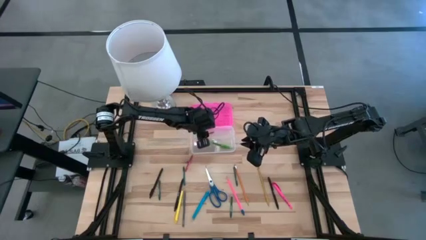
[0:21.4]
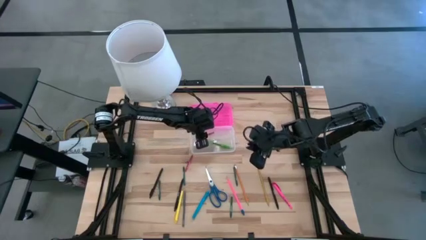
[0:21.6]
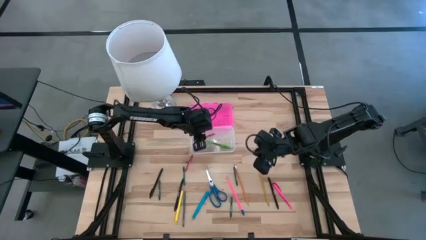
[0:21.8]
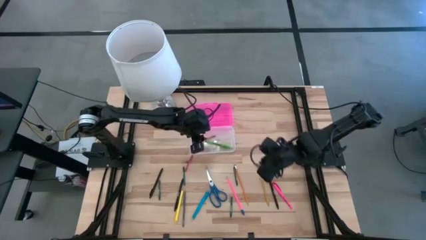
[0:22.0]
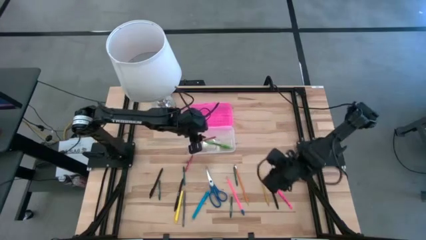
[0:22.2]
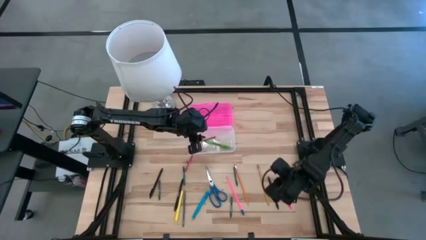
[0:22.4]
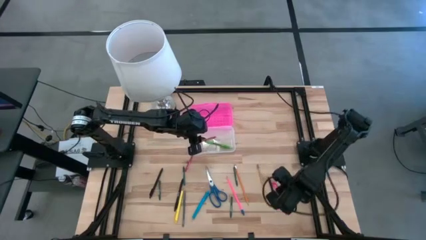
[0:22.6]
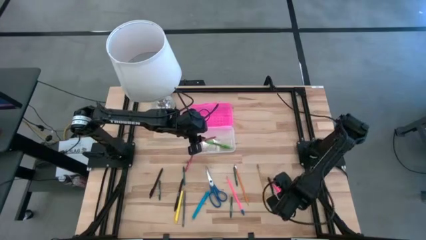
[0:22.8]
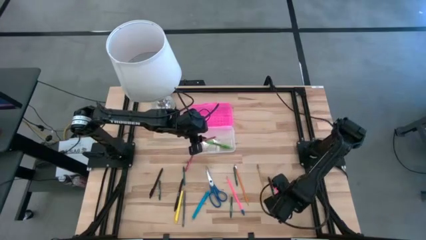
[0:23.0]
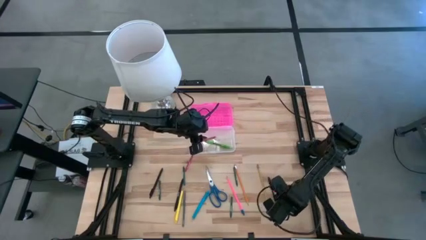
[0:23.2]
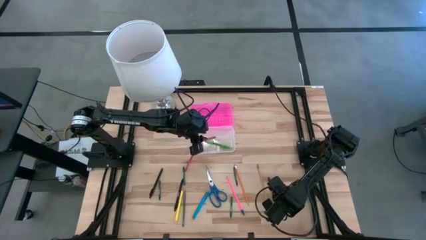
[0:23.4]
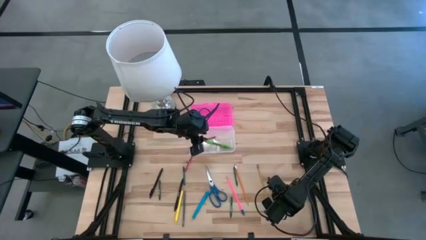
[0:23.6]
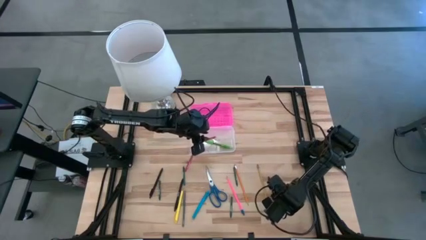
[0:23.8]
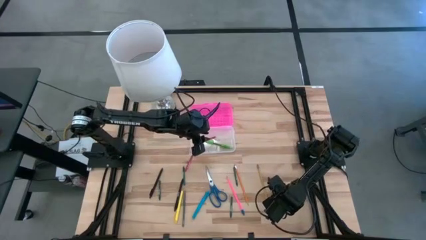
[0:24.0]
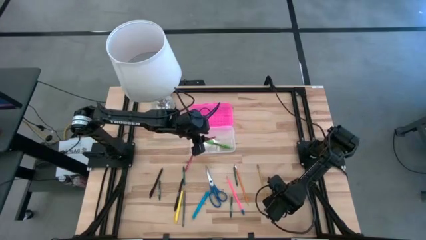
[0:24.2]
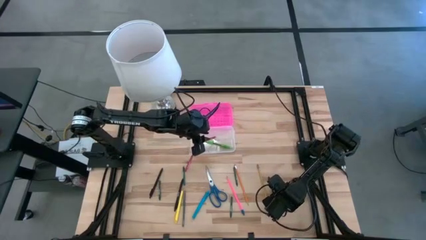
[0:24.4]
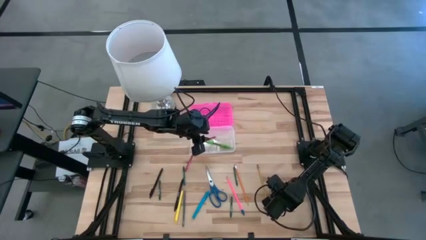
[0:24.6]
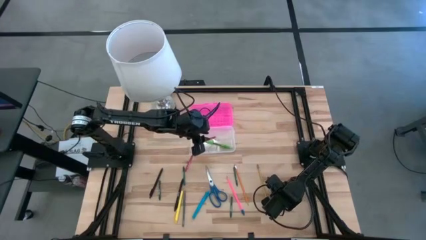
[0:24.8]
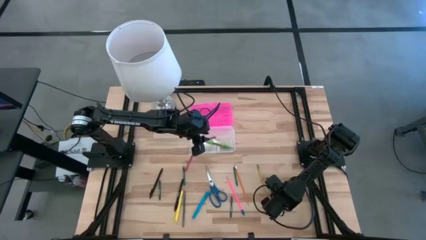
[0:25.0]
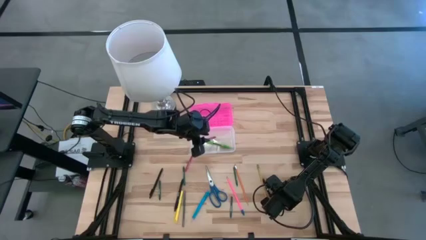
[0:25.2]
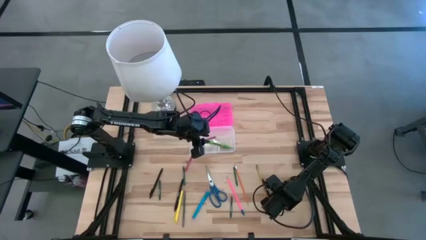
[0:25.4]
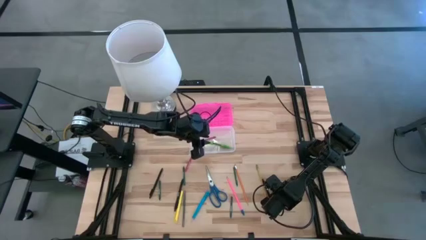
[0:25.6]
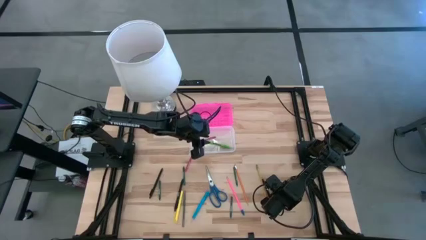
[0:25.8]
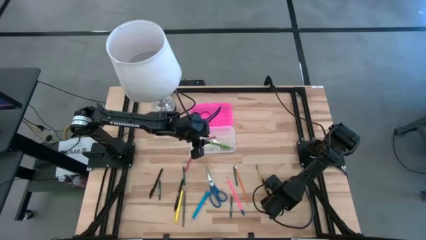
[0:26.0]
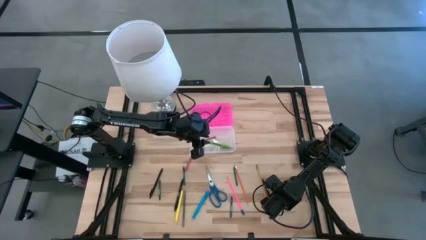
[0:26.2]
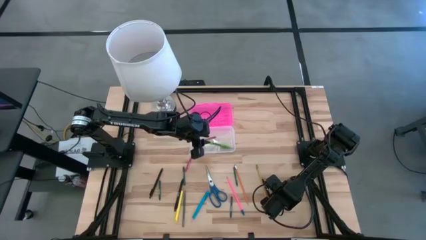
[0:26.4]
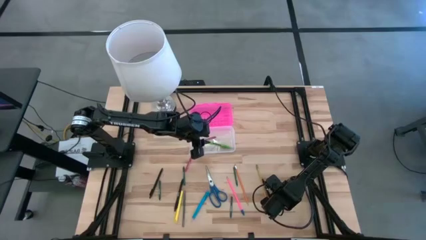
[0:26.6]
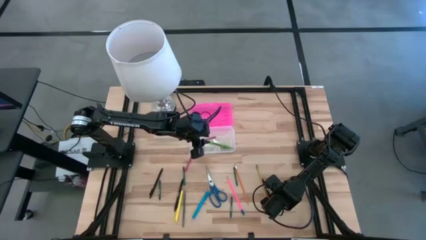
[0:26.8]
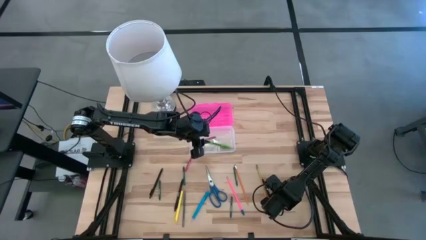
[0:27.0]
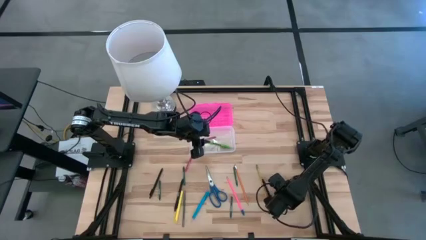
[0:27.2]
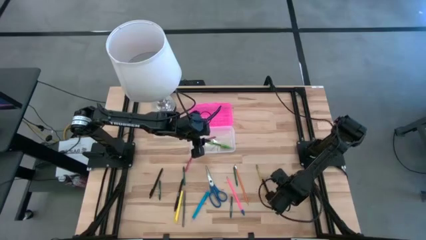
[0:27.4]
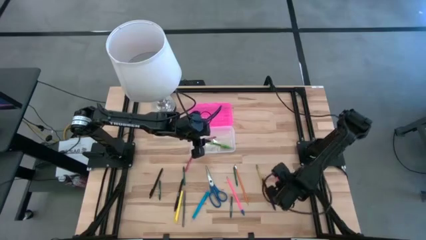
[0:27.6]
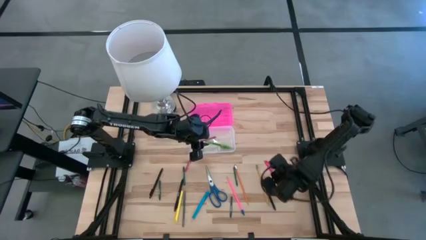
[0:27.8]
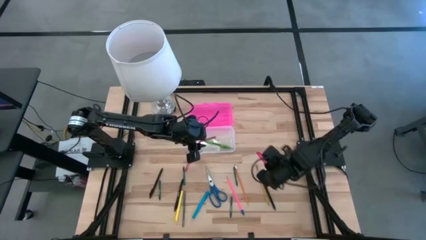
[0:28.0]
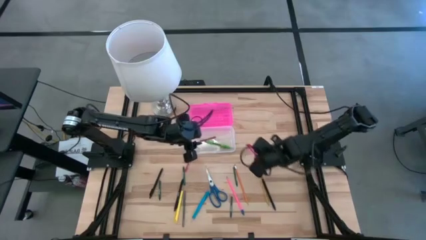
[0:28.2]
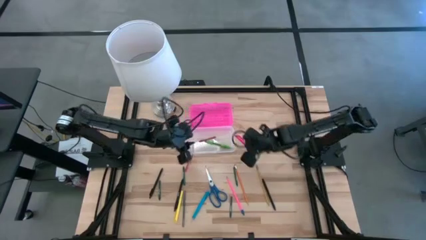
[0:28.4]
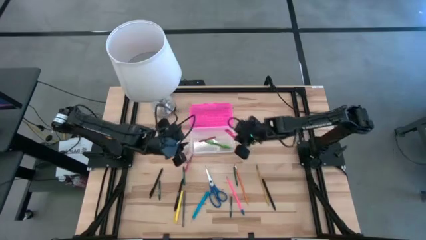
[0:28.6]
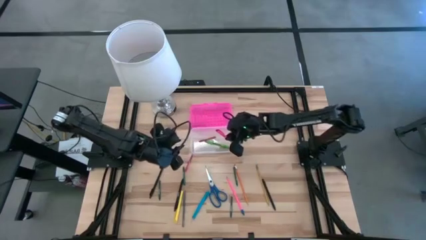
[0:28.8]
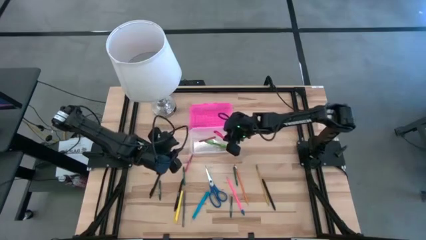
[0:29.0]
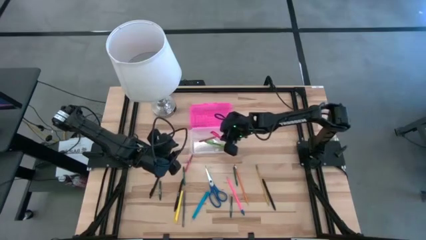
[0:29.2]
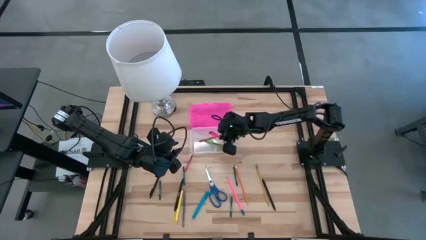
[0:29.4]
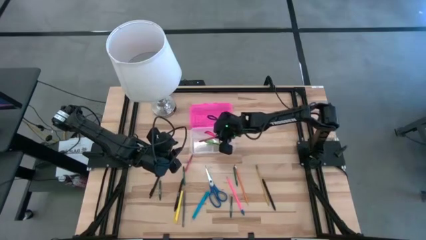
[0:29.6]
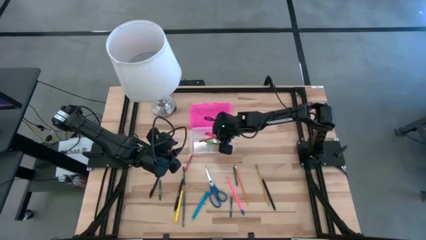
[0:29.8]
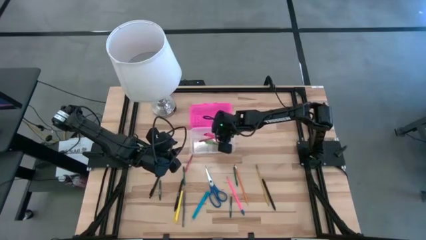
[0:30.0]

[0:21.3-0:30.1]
Task: Pick & place school supplies into a supply box
Put the pink pen into the supply box

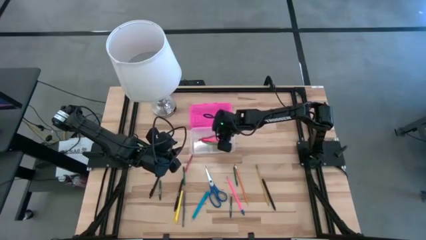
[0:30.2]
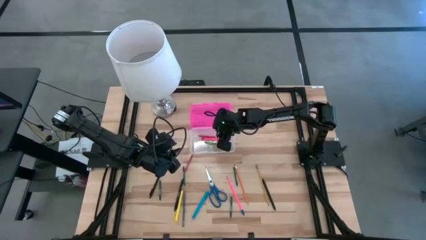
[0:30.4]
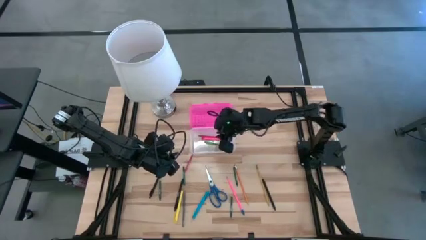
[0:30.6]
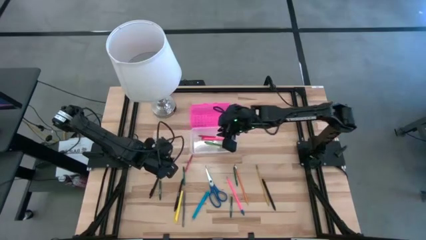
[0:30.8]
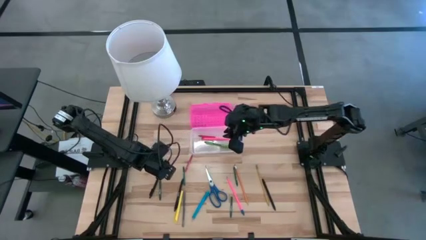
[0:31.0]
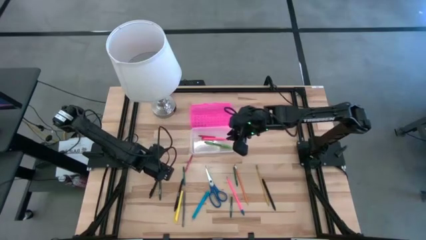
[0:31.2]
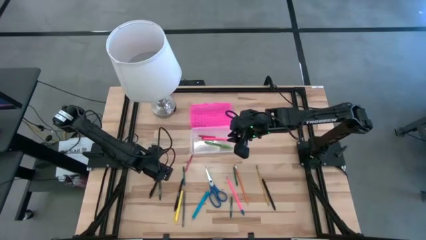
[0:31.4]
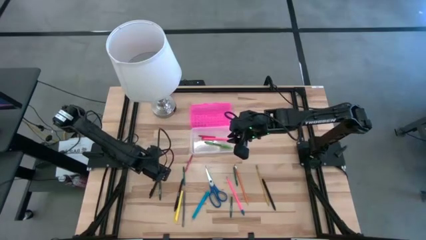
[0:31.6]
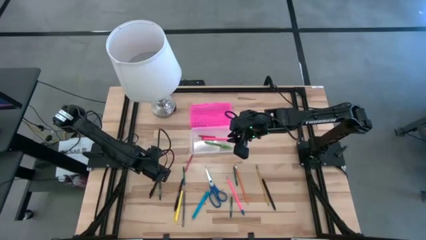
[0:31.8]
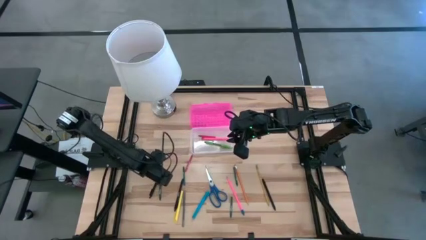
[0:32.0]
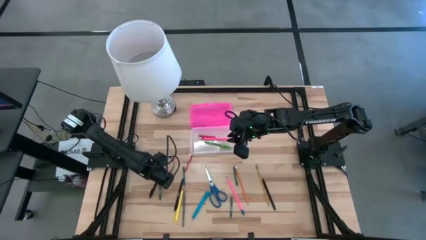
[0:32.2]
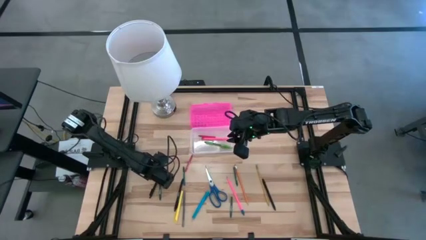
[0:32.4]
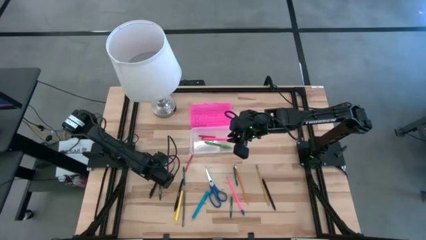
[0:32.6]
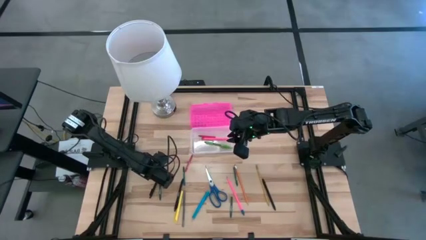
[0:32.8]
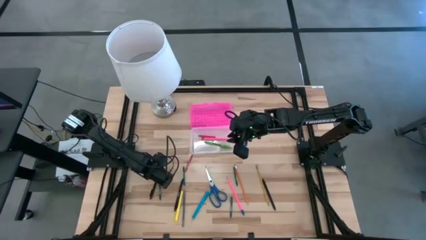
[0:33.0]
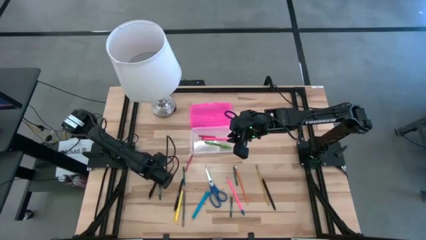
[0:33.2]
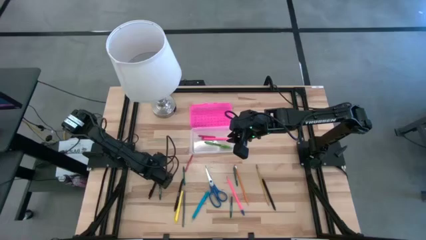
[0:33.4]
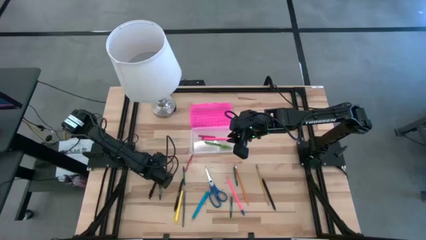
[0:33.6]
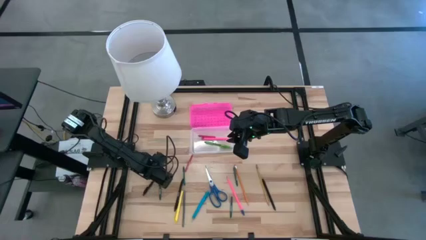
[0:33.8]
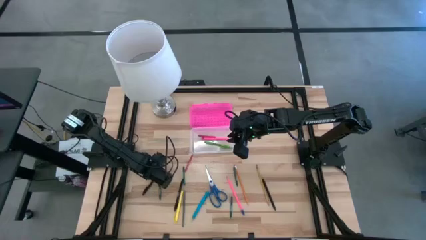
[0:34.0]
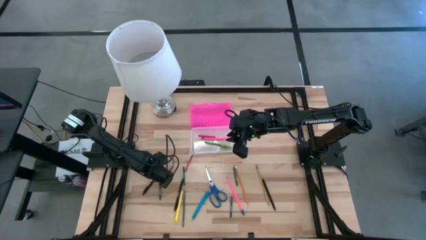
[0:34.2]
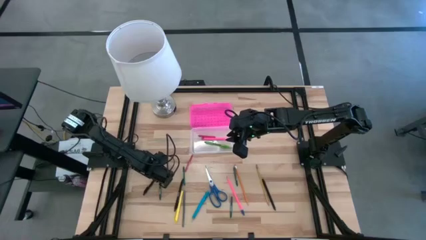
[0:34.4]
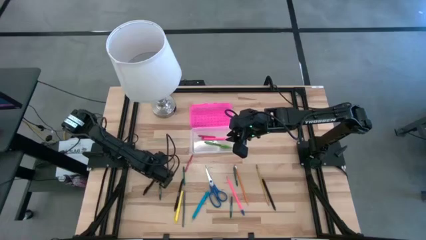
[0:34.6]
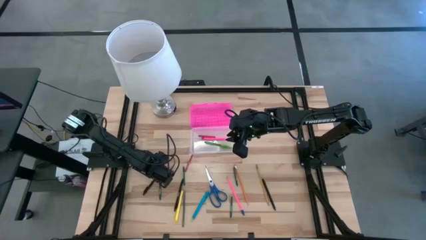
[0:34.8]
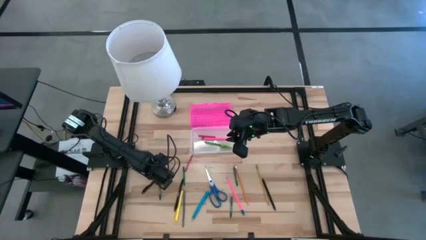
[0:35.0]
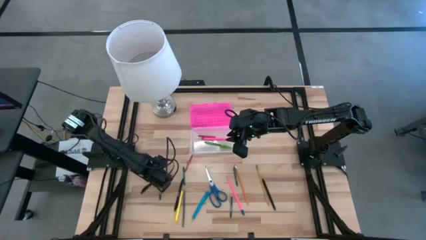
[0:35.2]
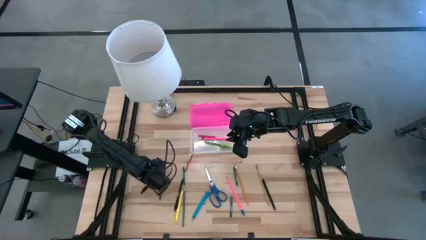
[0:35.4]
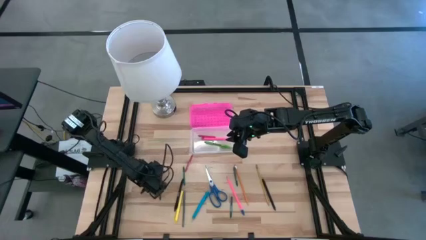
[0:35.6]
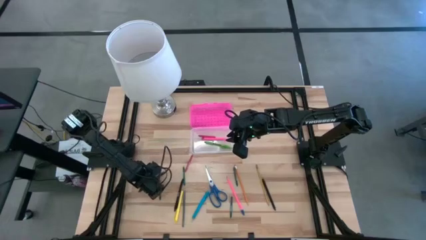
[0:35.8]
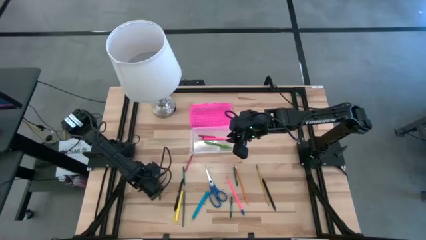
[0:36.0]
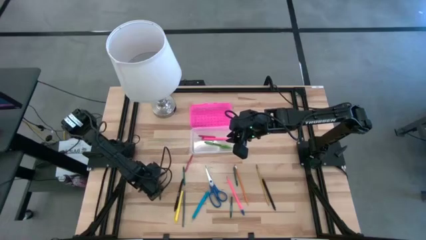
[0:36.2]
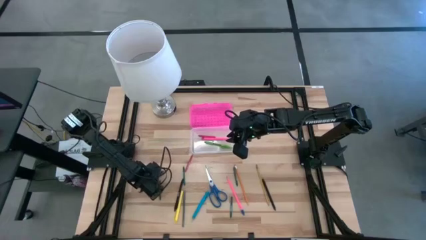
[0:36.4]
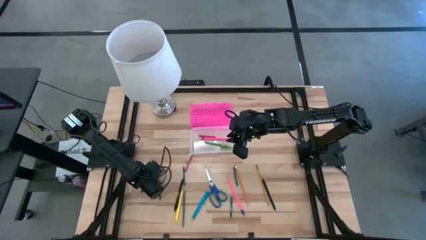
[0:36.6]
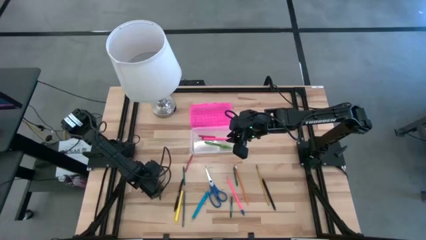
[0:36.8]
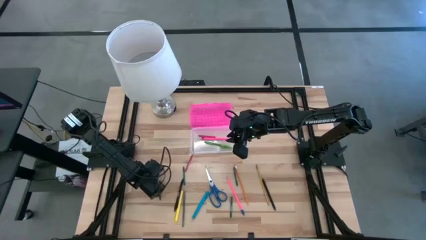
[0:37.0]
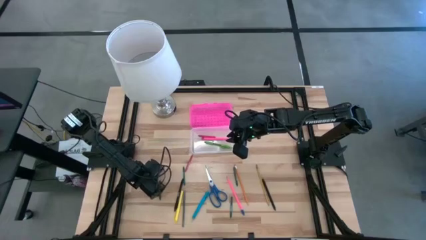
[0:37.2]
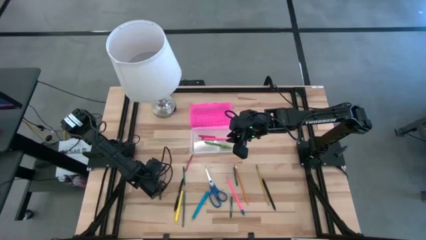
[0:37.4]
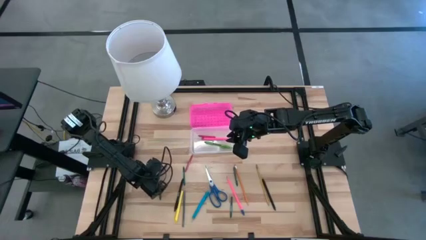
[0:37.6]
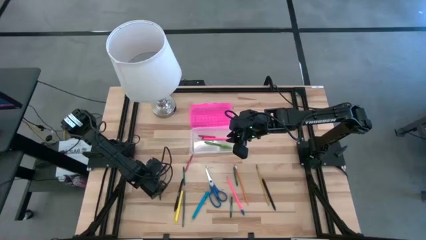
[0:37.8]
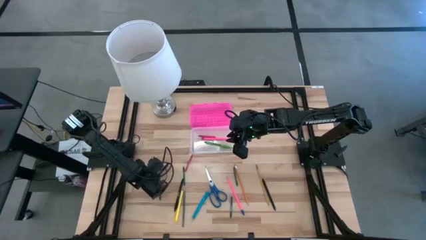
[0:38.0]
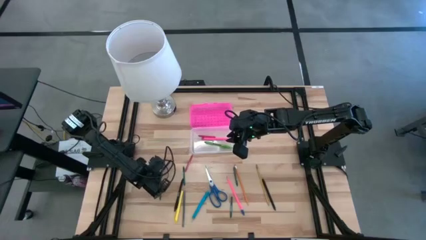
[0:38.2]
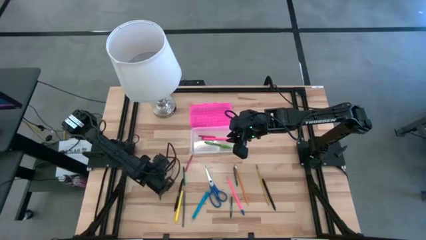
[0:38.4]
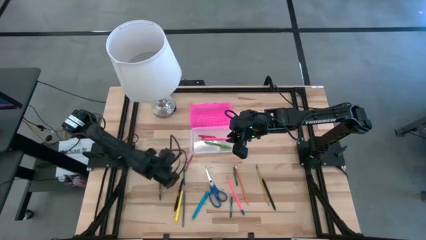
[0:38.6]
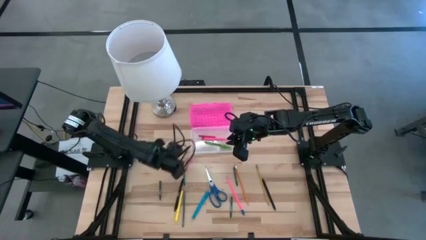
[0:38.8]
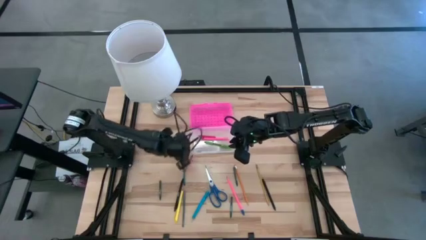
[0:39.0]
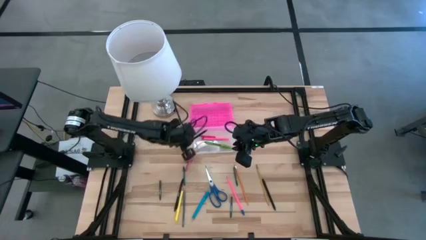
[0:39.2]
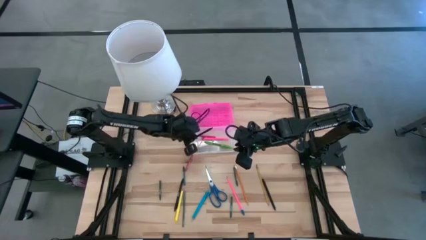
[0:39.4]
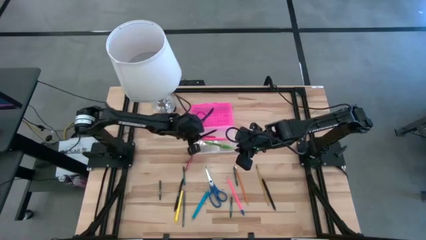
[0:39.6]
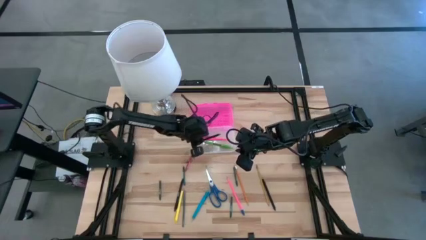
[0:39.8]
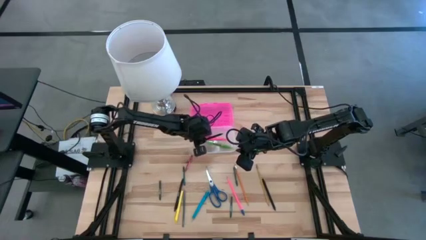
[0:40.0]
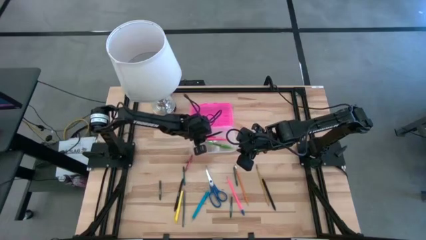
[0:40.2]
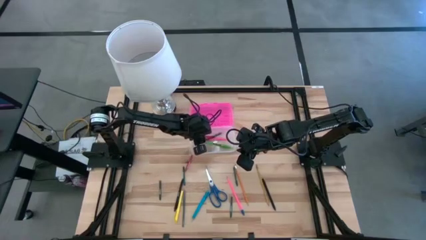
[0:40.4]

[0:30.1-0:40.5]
Put the top left black pen into the supply box
